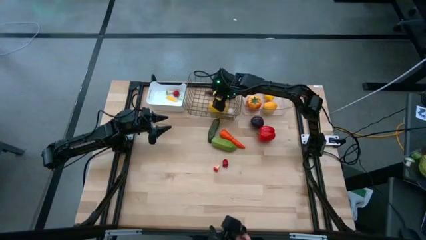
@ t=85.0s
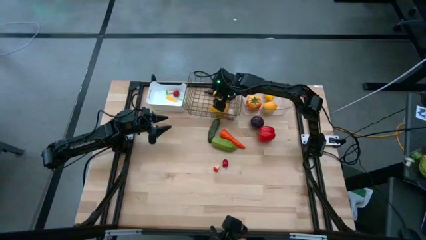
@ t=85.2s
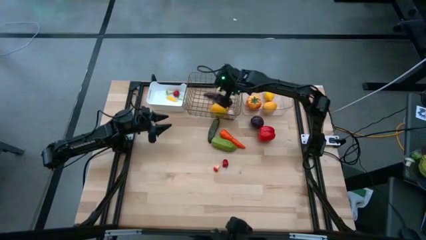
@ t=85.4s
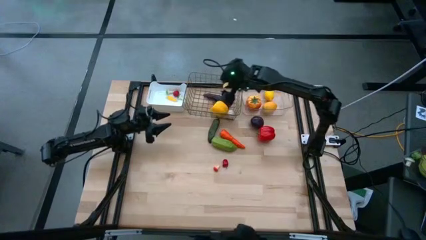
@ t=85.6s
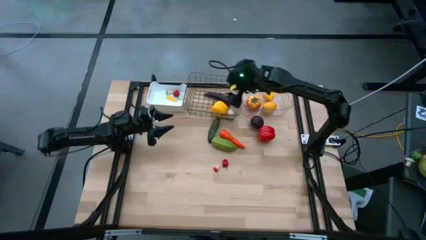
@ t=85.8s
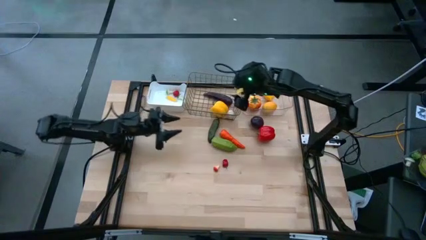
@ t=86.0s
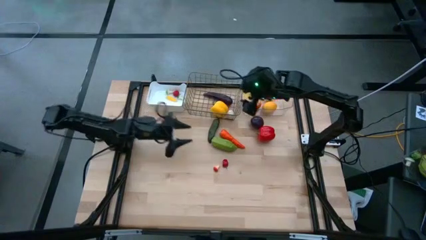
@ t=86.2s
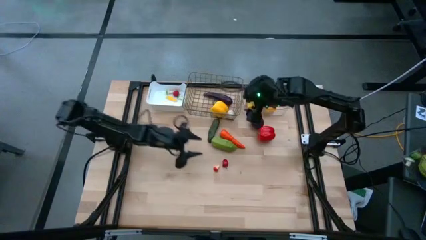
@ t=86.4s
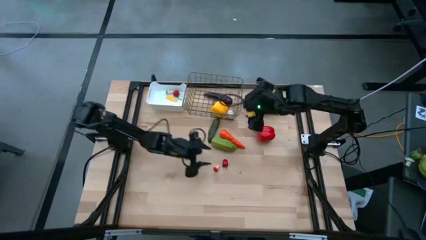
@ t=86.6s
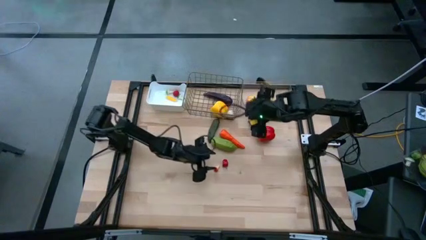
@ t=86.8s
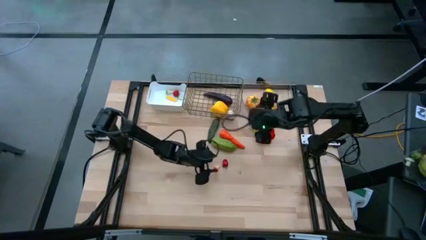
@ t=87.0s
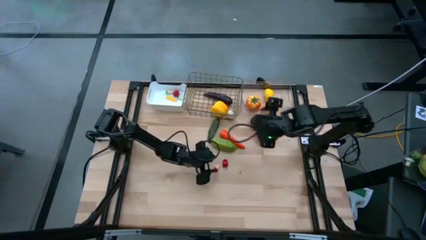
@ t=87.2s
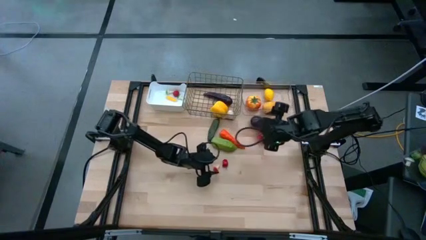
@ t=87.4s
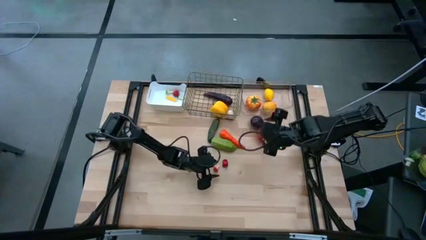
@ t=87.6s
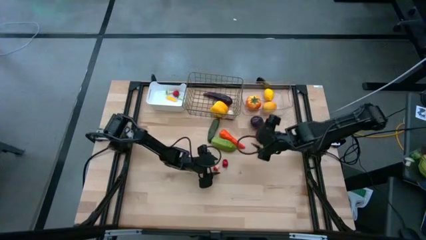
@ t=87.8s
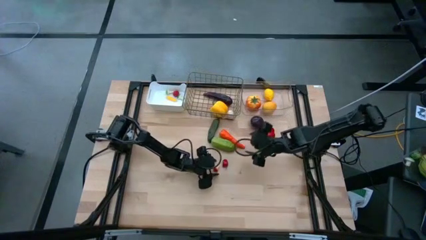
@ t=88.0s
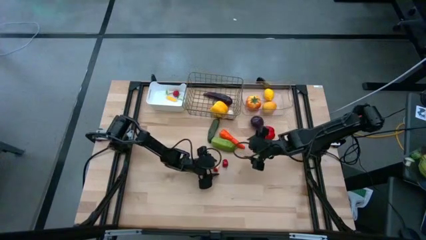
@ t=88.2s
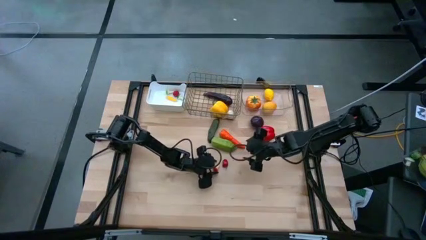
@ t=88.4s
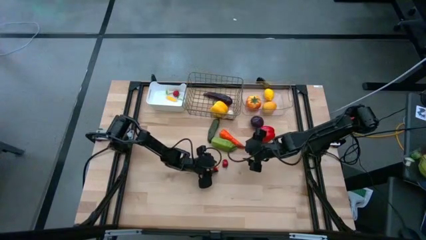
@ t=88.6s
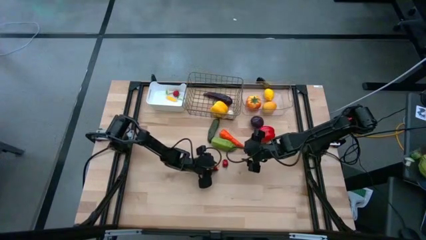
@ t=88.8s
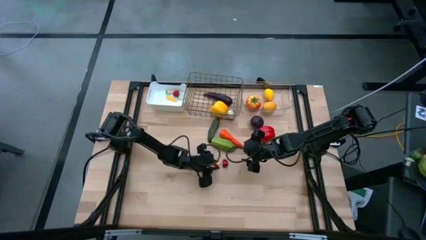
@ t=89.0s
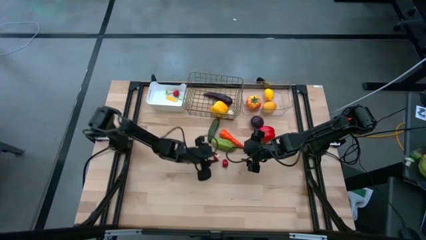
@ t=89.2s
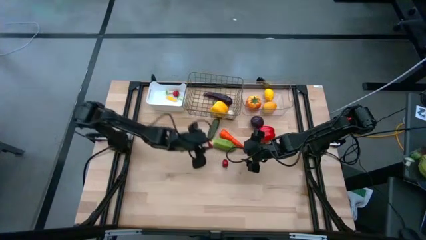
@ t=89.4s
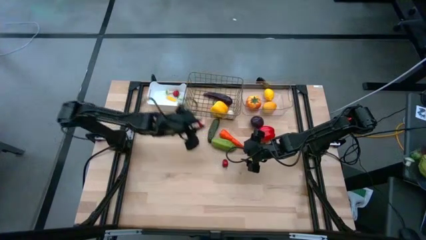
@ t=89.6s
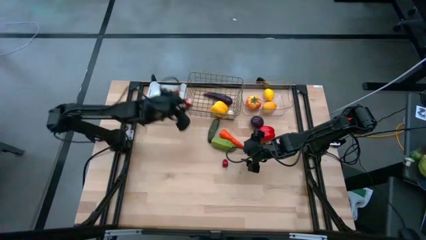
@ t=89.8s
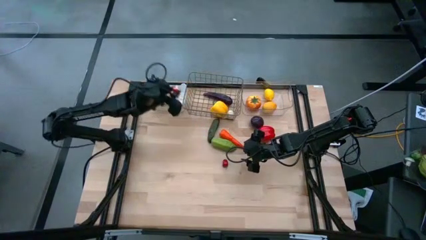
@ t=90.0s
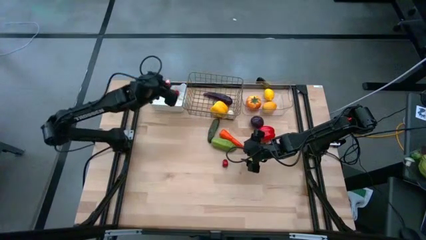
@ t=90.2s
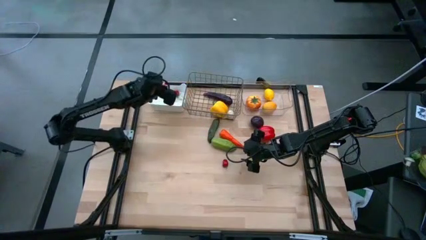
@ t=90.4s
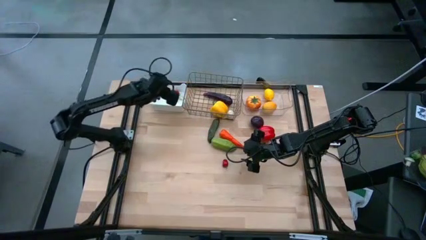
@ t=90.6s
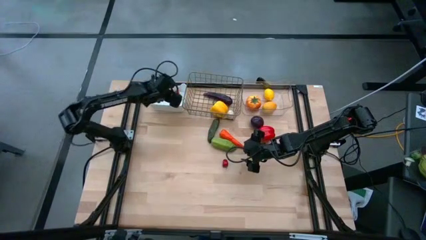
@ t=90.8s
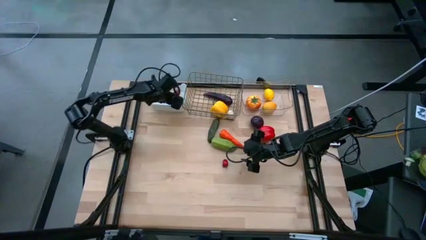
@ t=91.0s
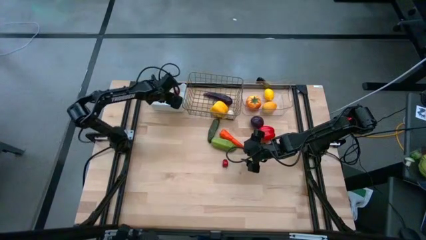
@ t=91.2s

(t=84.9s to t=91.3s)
Task: Sort produce into baskets
Put the red mushroom into the white bin

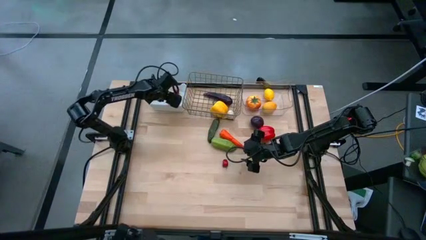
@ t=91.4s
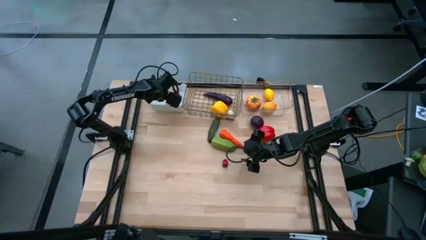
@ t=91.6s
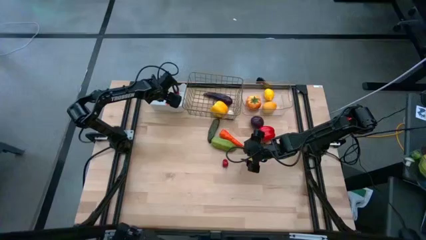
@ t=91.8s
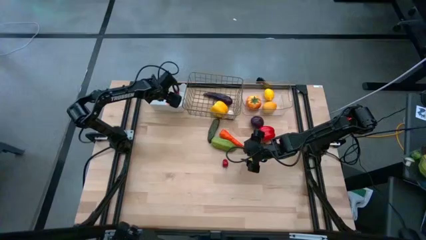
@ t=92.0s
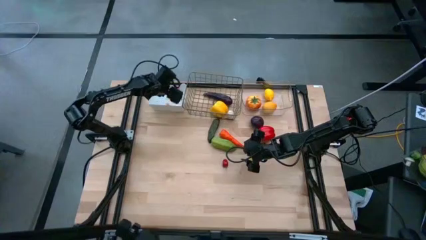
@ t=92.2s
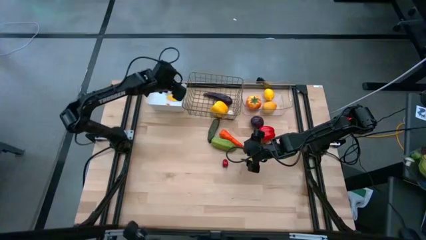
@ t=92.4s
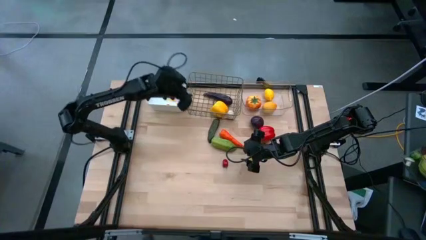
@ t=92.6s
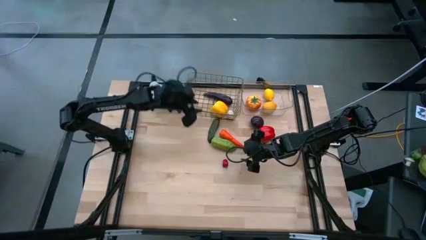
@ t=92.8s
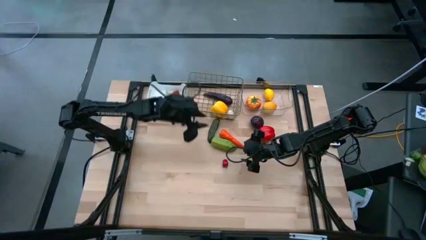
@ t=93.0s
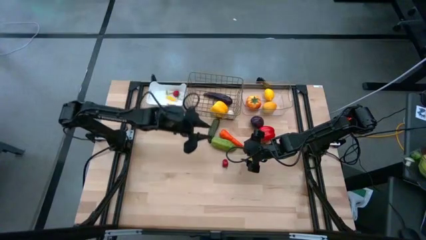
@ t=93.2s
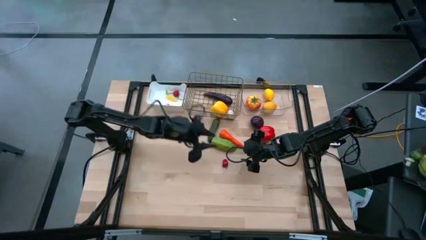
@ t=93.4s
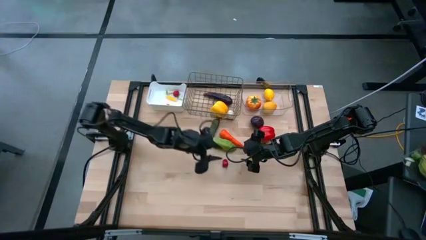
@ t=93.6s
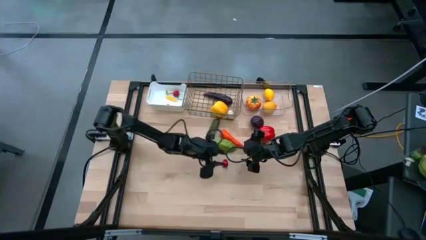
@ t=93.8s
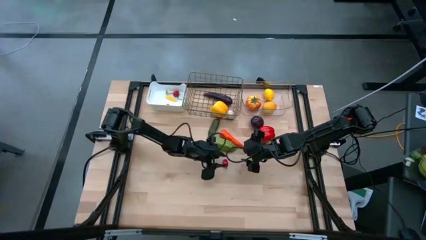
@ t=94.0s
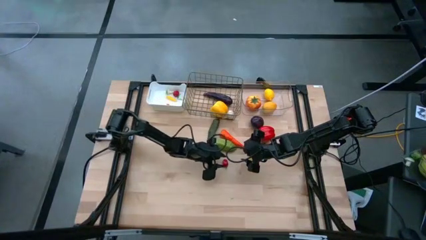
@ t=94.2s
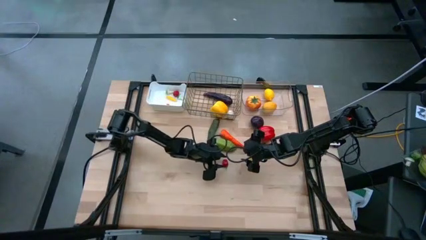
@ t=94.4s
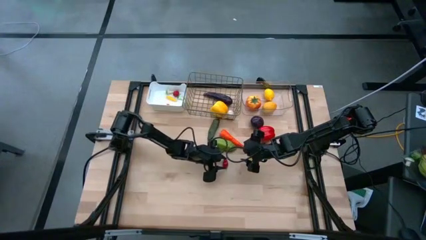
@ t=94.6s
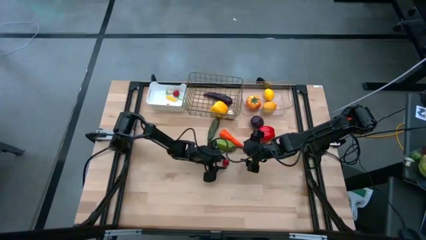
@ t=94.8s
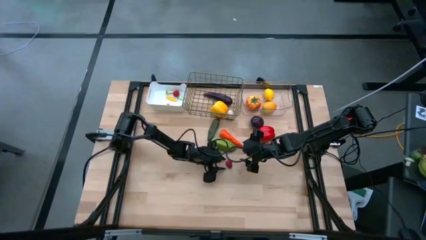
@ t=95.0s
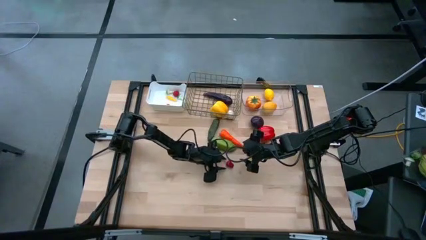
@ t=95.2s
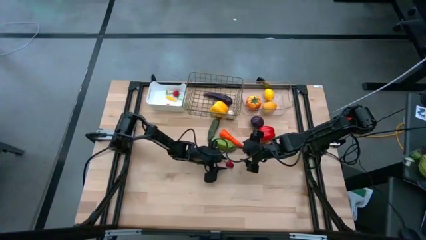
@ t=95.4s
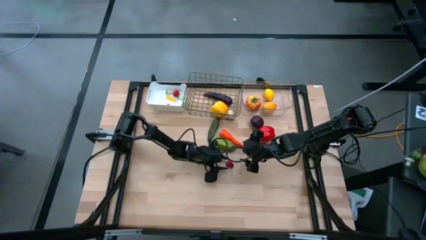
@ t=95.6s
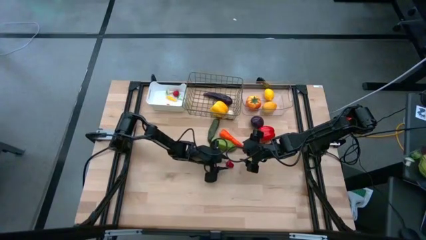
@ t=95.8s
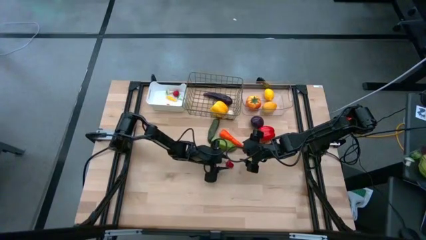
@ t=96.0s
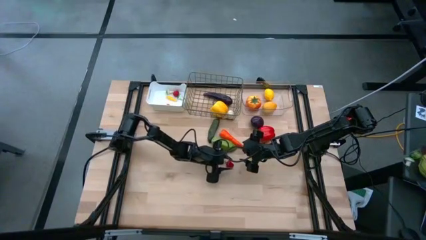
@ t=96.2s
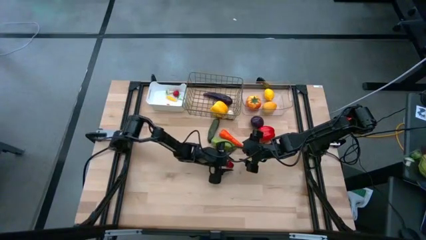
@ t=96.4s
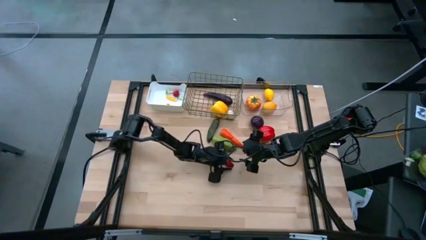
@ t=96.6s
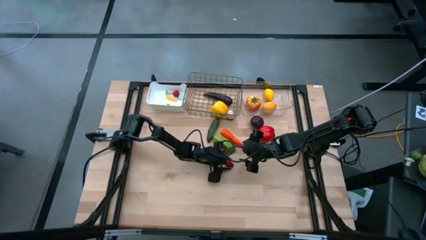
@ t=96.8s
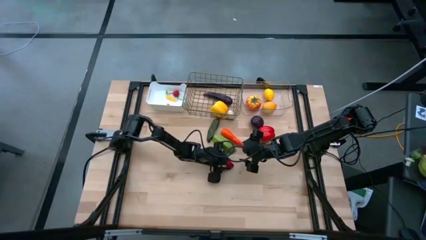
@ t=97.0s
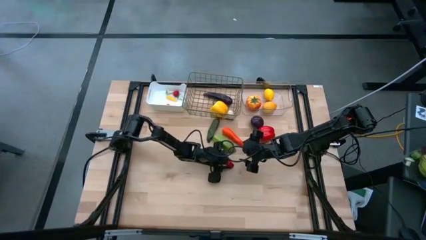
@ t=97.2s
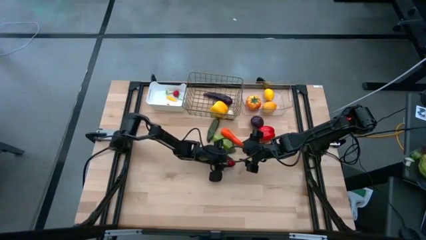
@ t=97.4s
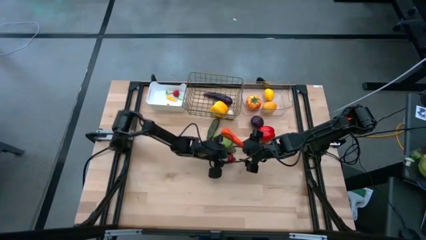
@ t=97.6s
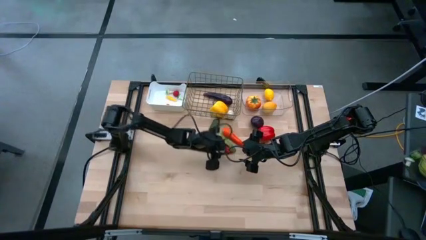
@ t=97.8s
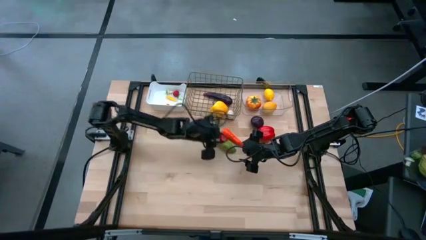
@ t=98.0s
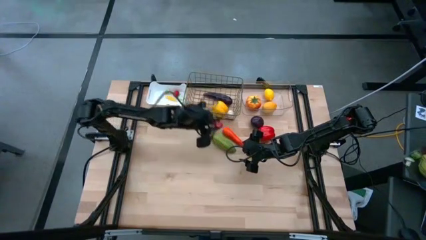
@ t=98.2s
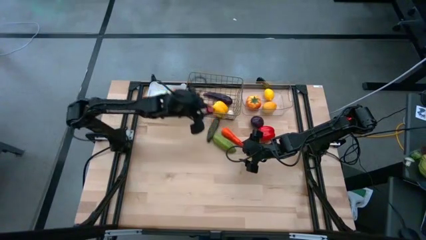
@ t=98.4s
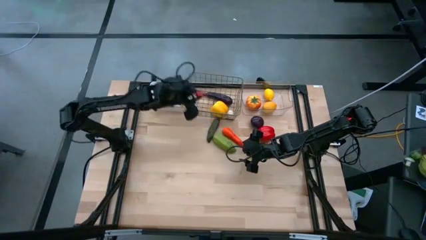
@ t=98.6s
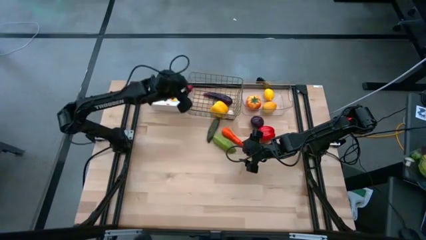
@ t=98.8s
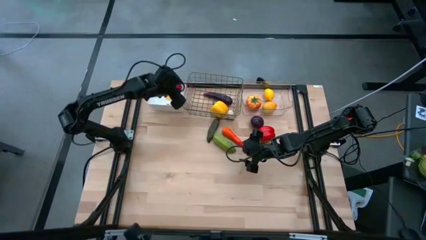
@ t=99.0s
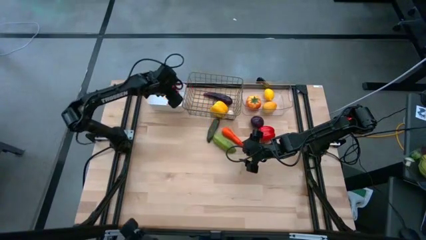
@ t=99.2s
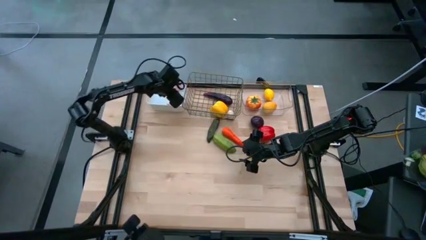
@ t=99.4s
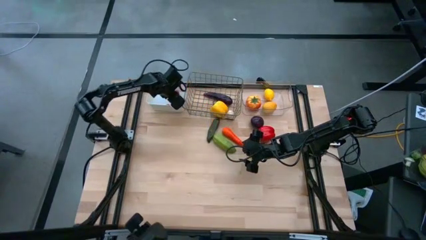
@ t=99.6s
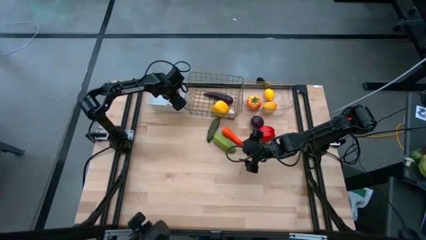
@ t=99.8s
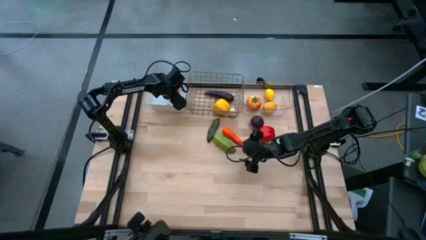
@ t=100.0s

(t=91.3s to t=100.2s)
Put the small red bell pepper into the white bin
